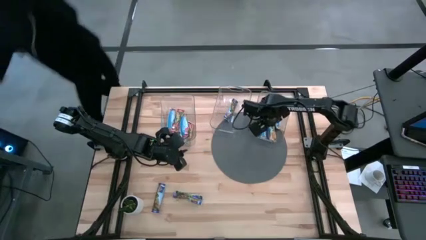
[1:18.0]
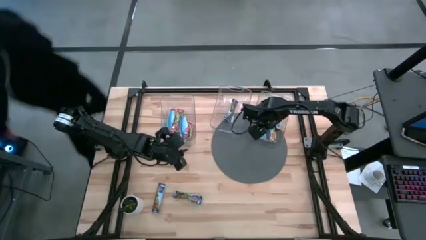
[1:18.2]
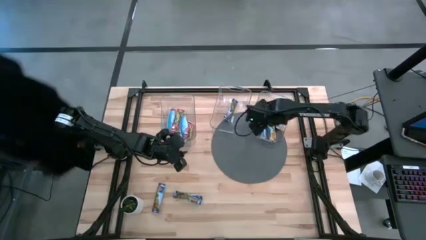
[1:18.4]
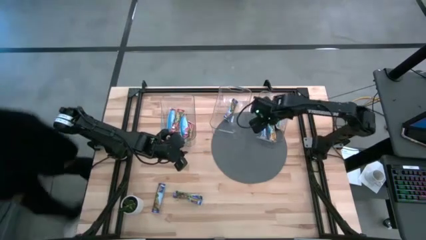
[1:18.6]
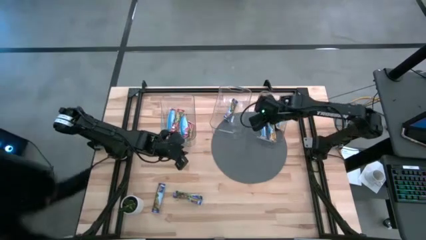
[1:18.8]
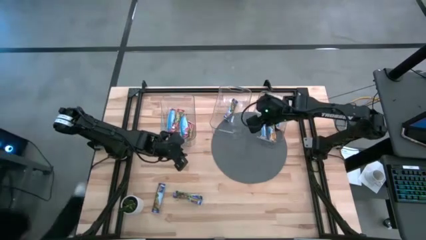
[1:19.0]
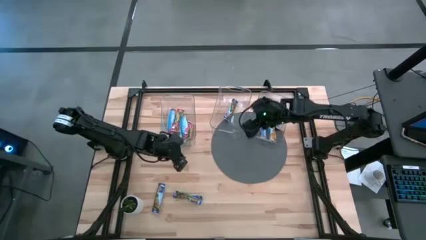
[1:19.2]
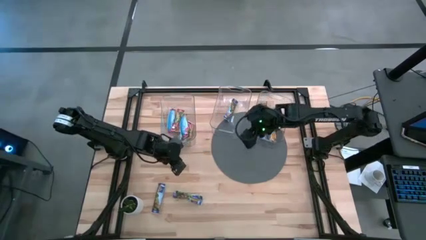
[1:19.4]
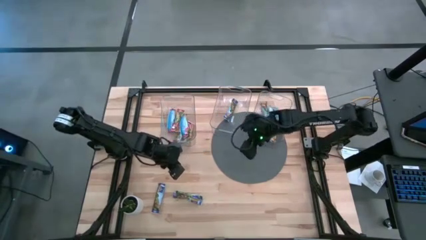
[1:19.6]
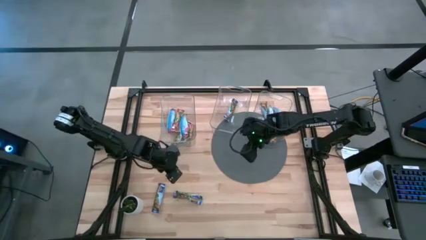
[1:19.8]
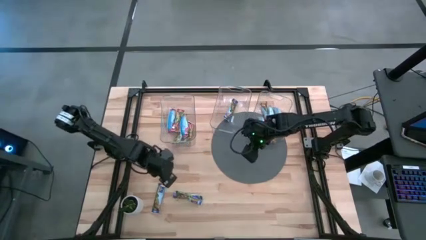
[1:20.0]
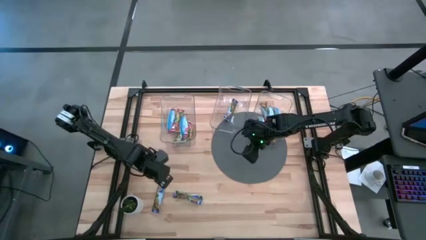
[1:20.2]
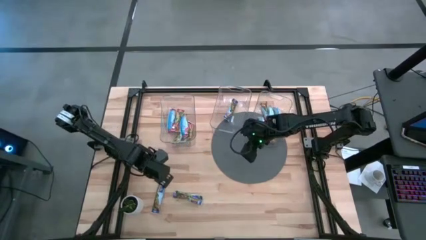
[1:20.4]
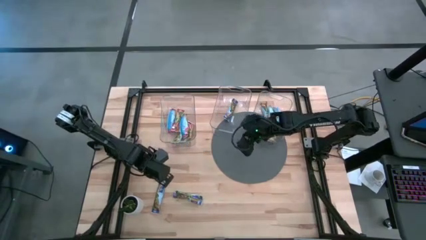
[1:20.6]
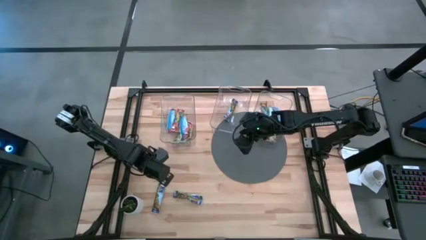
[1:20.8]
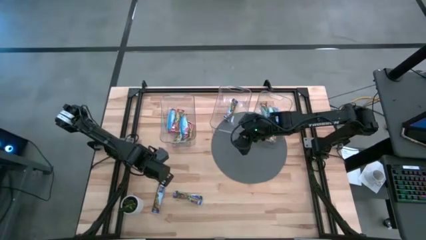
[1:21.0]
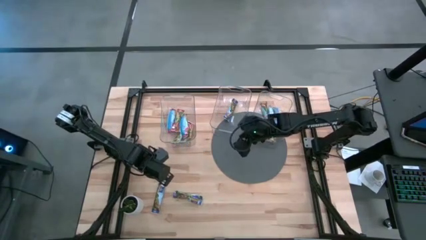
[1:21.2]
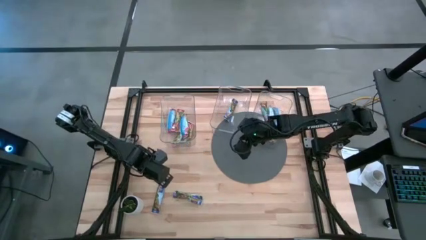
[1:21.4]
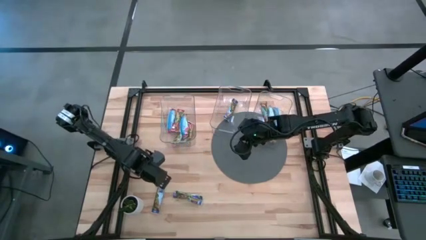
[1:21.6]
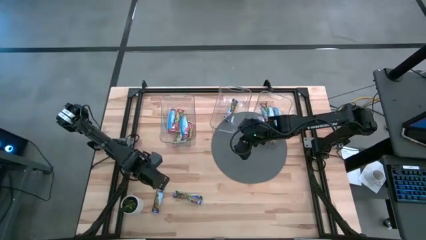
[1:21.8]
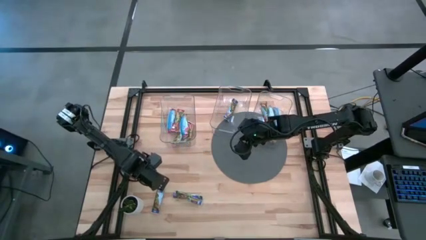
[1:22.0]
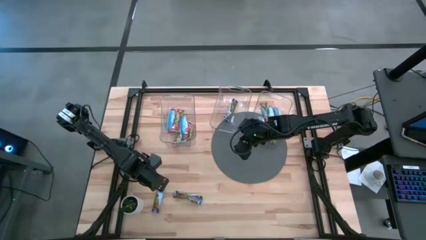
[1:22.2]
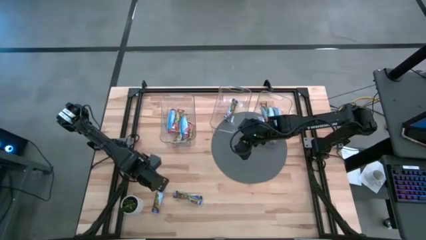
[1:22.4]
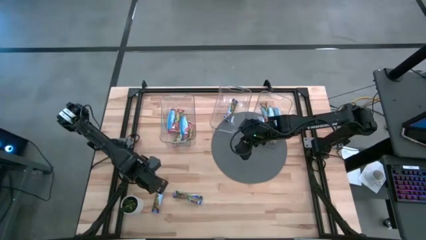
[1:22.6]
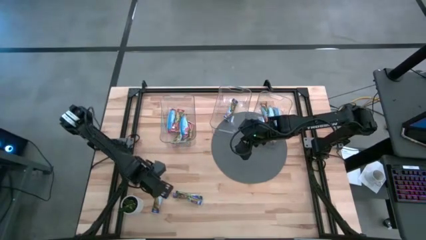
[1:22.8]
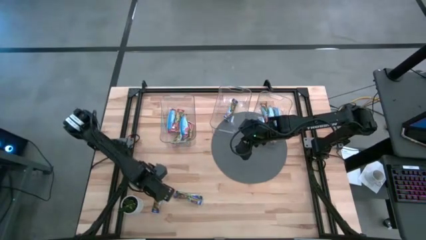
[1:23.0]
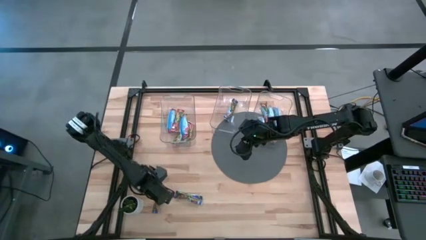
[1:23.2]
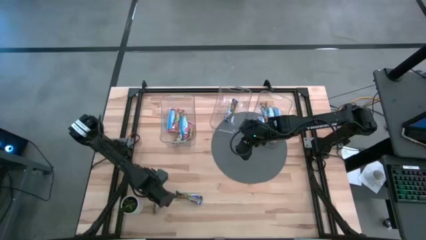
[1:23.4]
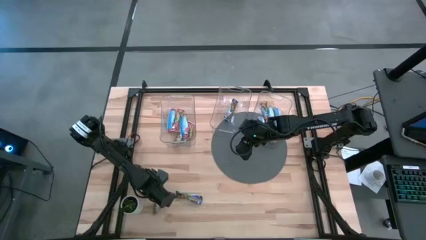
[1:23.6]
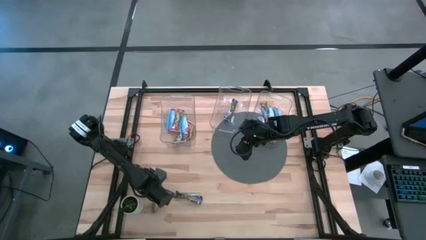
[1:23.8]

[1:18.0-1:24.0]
Task: Pick and place Granola Bars by type
Put the blue granola bar into the middle transparent bin

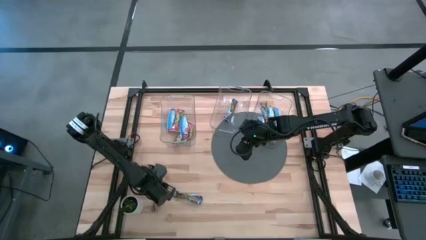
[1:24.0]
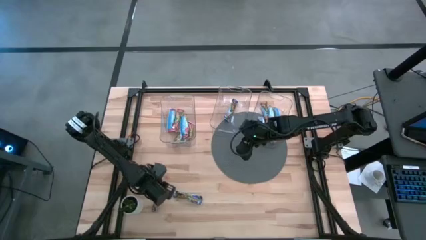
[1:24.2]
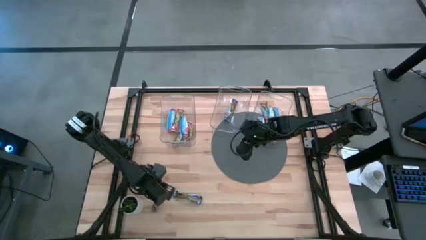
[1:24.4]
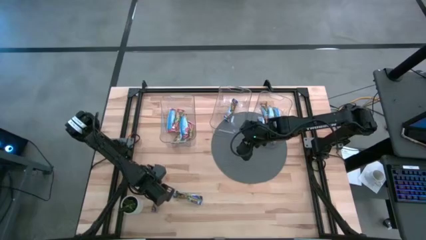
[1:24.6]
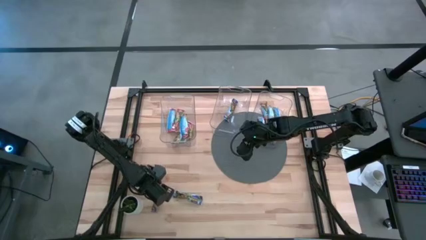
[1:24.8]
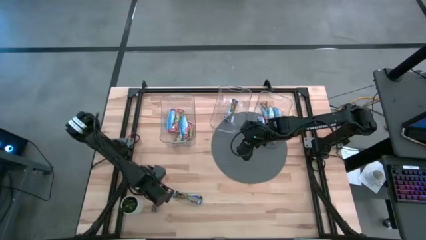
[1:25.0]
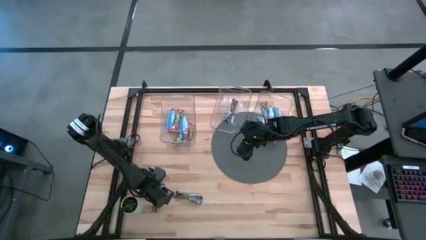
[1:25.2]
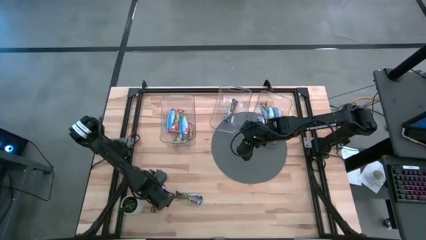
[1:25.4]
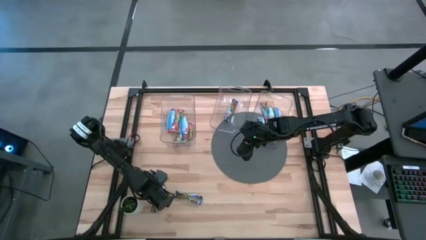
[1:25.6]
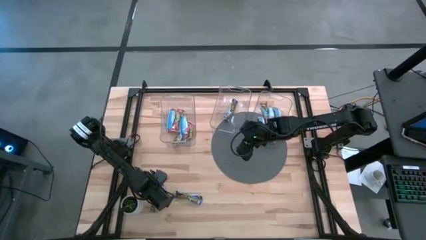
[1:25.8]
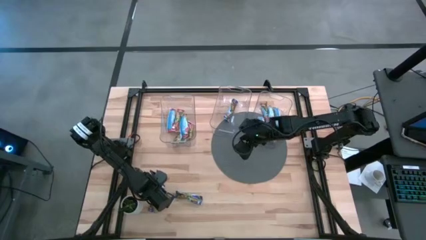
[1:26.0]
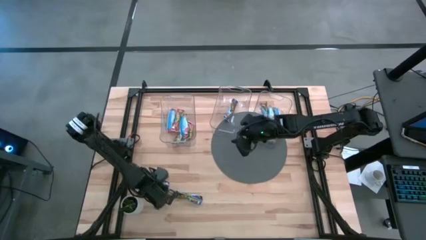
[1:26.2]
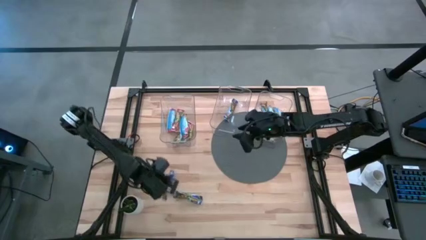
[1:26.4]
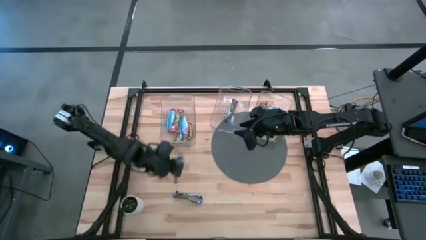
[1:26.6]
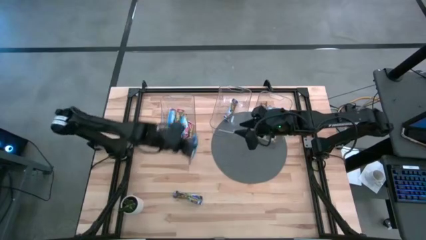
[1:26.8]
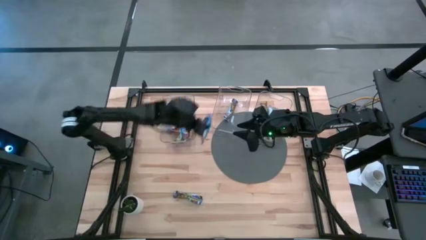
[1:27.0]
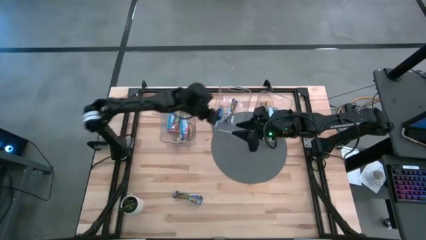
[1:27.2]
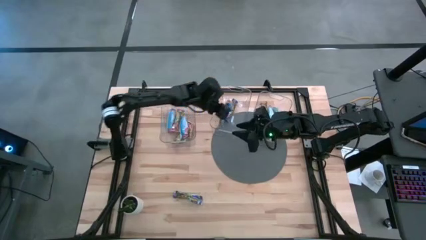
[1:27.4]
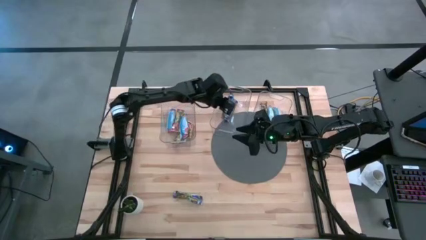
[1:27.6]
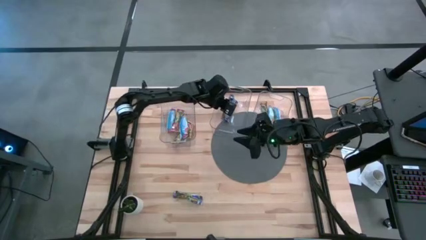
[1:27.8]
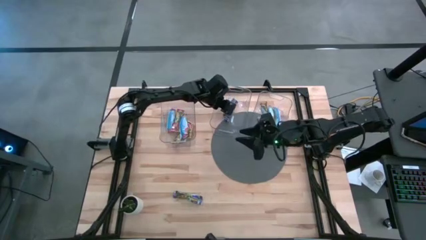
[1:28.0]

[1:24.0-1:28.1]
Put the blue granola bar into the middle transparent bin

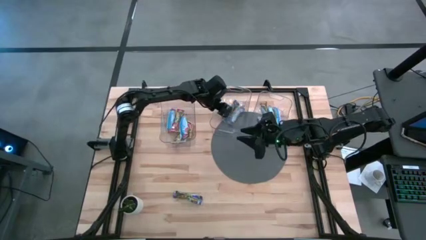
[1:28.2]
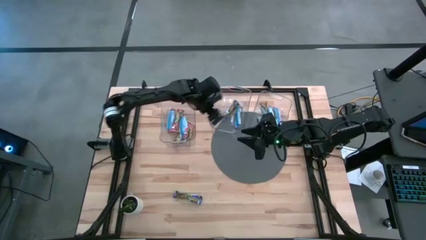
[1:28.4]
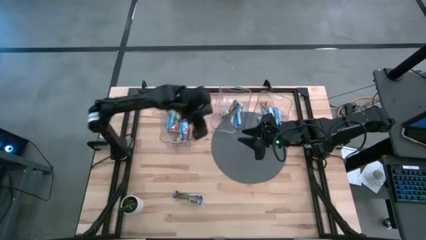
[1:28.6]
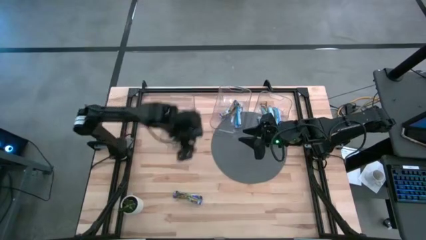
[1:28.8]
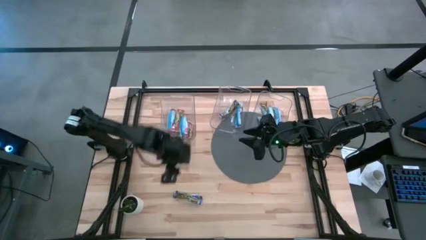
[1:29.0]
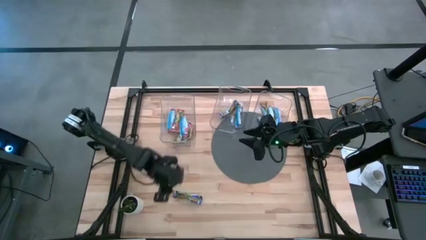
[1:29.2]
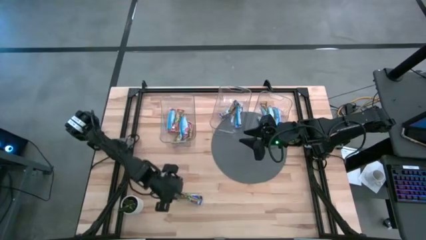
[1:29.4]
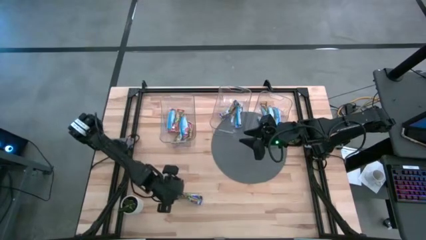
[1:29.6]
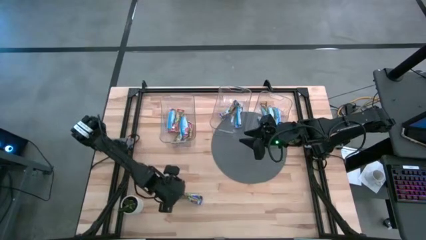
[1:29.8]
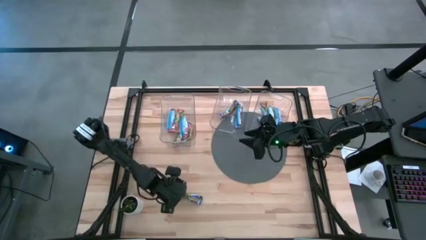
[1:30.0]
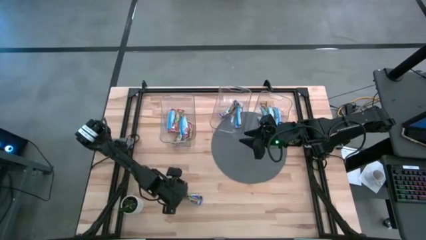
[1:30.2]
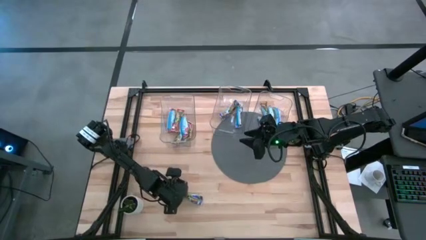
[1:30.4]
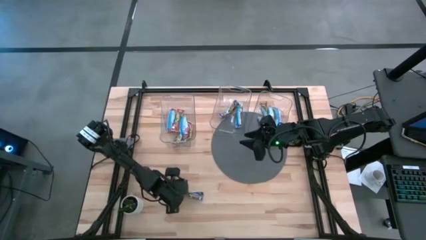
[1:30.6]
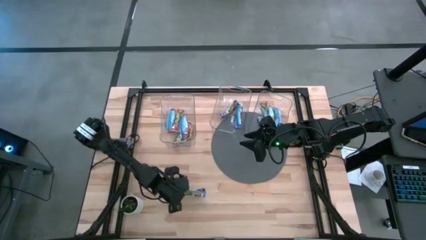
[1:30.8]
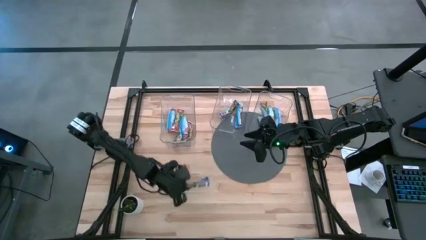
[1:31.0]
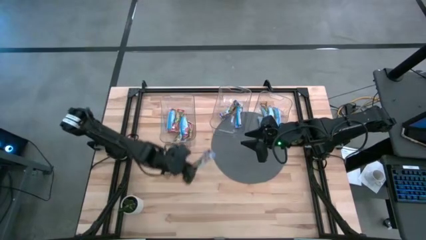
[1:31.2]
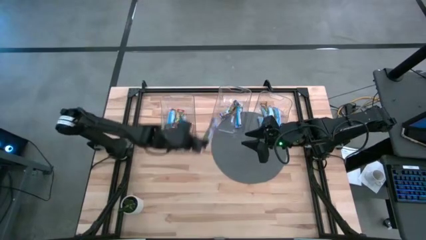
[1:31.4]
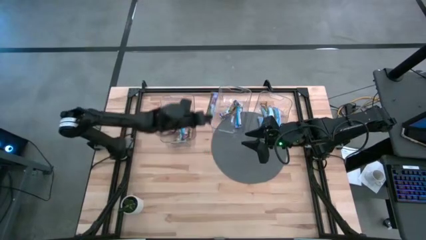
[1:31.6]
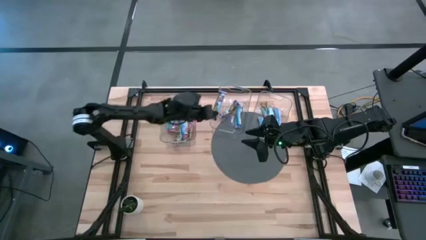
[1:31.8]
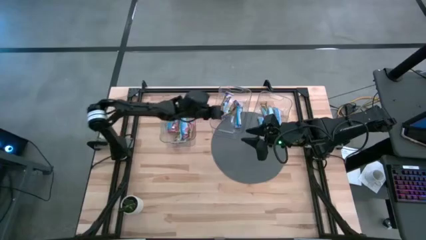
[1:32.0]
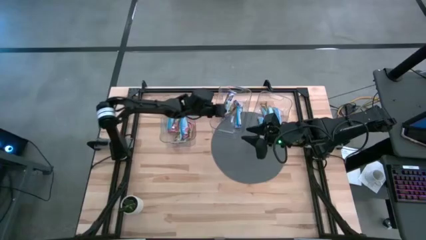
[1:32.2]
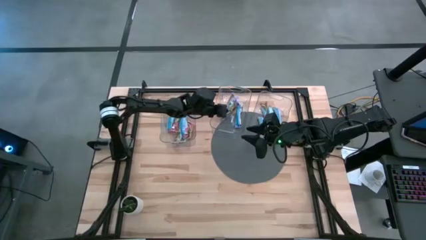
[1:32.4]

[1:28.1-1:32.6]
Put the blue granola bar into the middle transparent bin

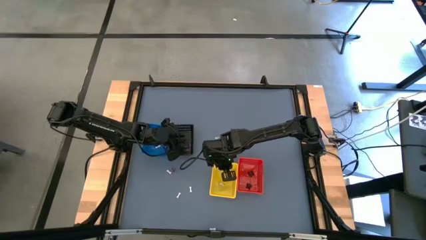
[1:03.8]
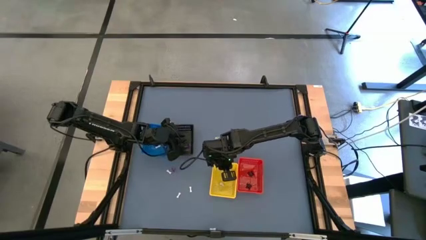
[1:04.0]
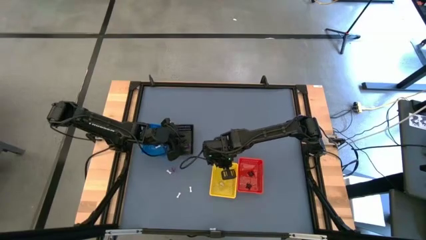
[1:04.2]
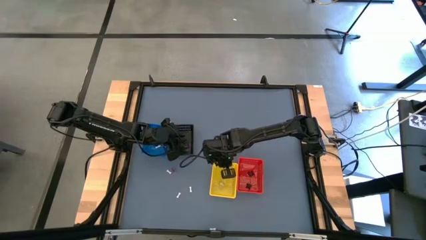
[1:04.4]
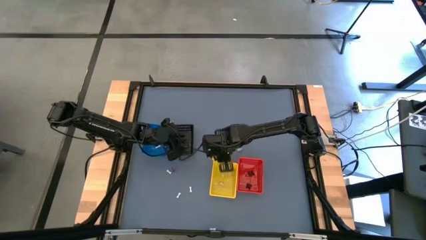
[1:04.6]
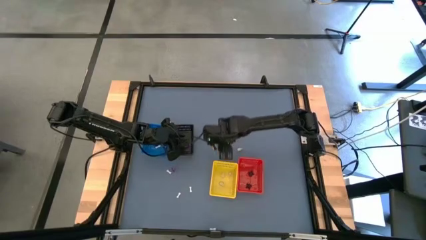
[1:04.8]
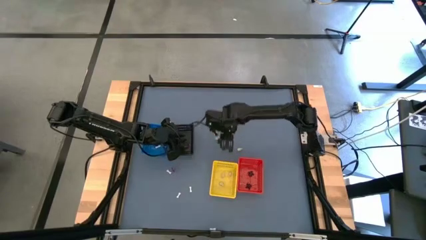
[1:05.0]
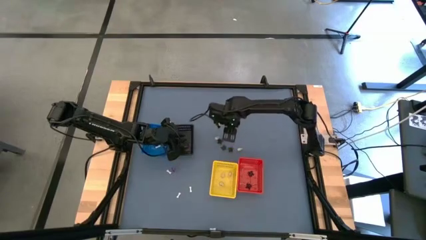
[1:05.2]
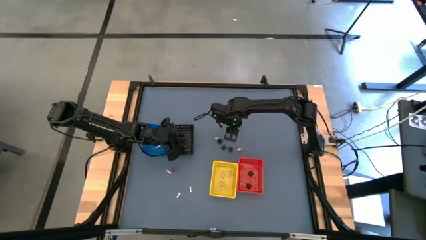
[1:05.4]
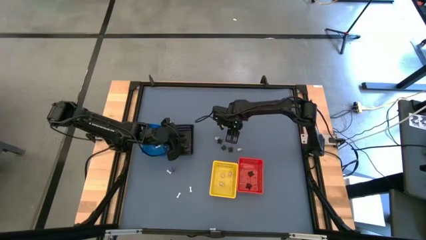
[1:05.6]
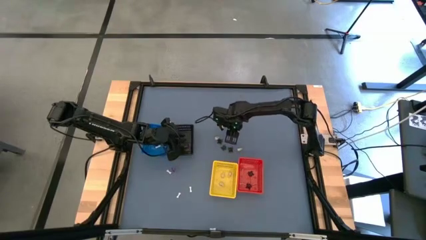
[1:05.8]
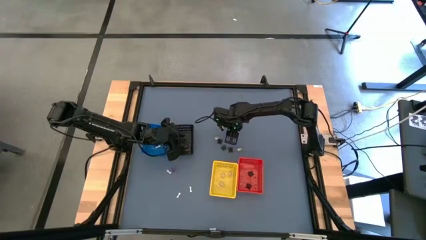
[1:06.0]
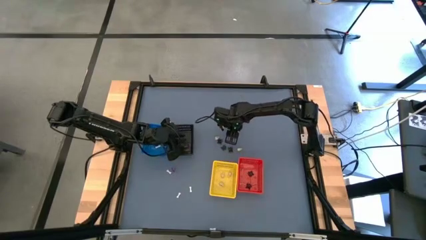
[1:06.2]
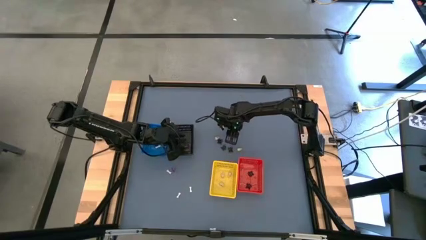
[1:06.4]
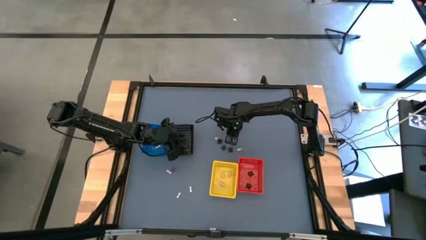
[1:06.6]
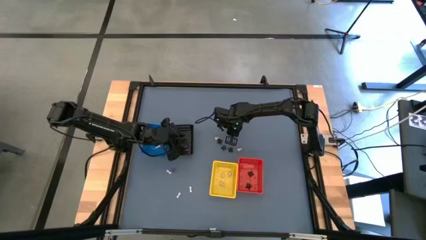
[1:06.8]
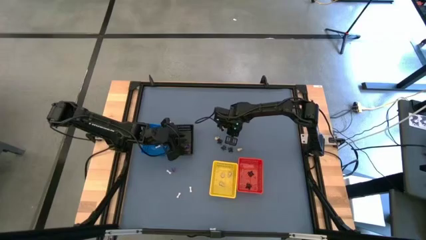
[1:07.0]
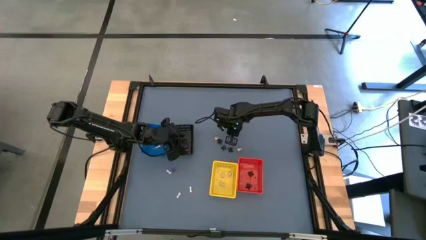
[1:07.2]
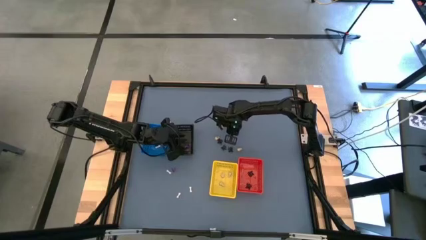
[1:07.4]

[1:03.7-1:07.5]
Task: Sort Halloween decoration
Put the spider toy into the red bin
